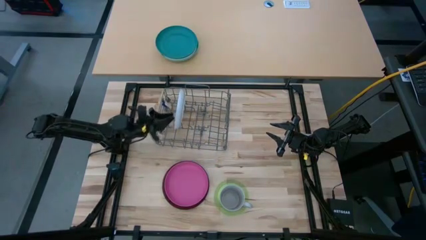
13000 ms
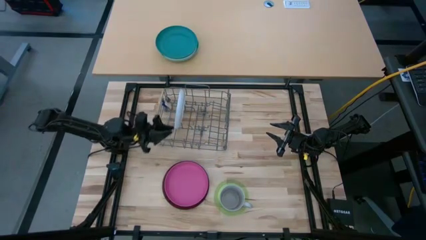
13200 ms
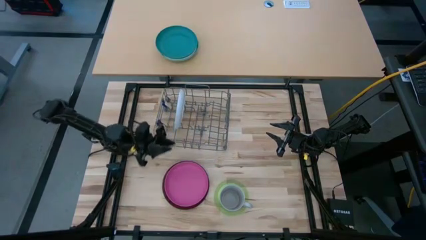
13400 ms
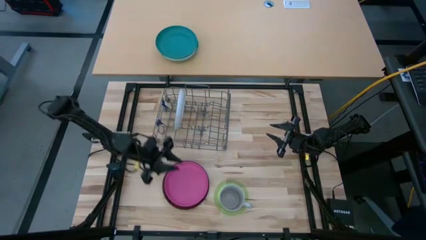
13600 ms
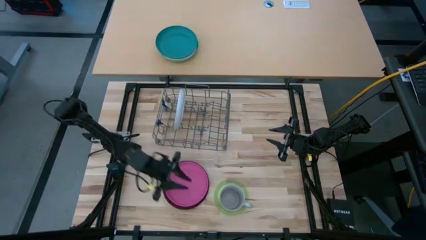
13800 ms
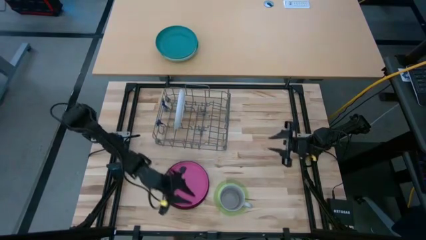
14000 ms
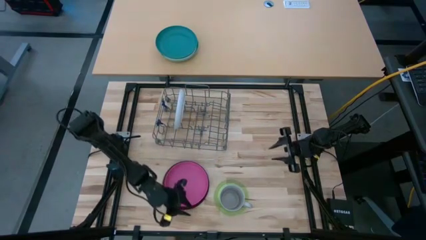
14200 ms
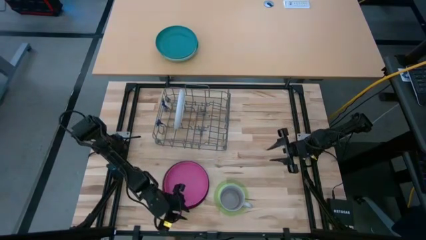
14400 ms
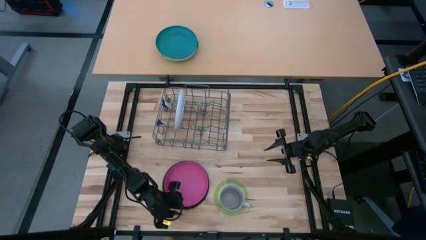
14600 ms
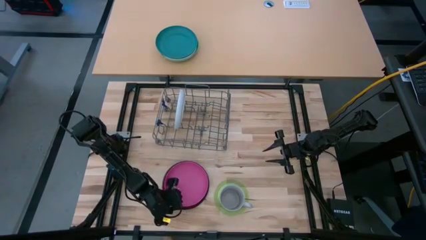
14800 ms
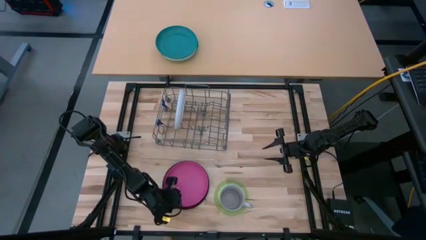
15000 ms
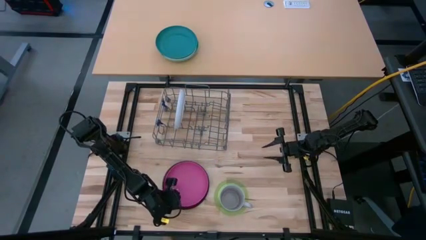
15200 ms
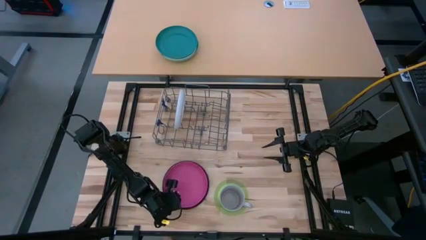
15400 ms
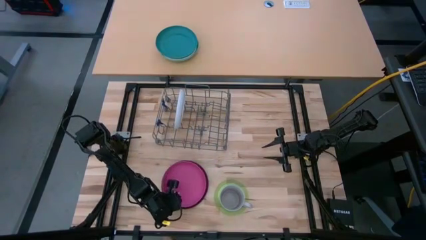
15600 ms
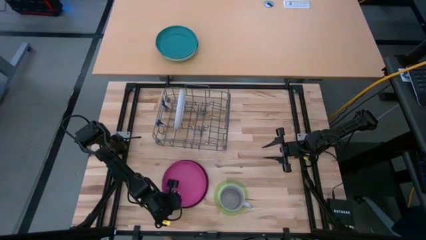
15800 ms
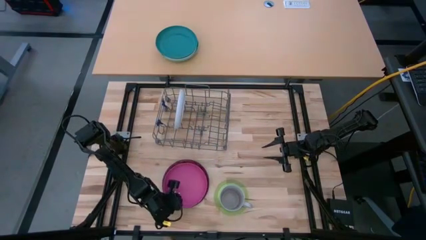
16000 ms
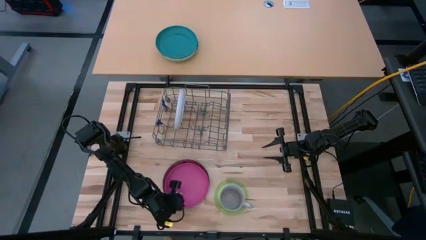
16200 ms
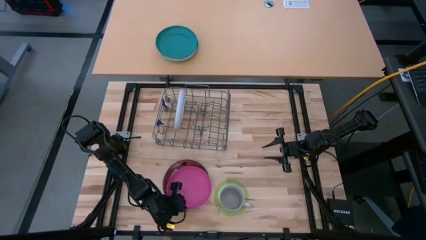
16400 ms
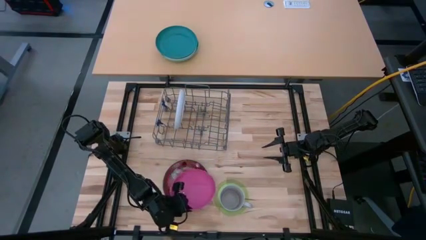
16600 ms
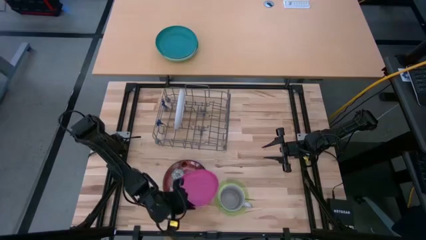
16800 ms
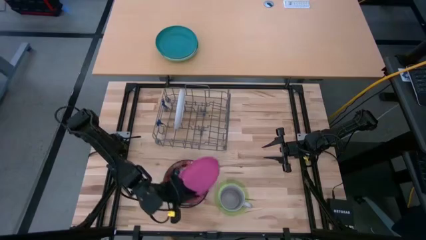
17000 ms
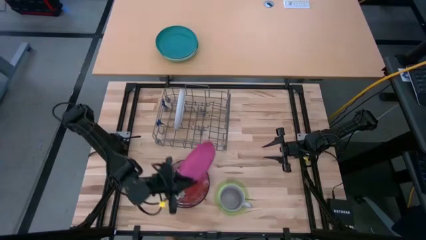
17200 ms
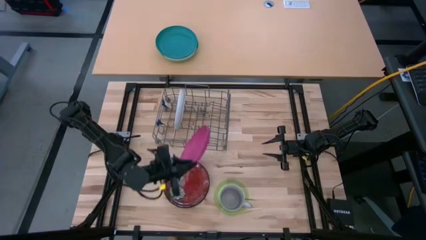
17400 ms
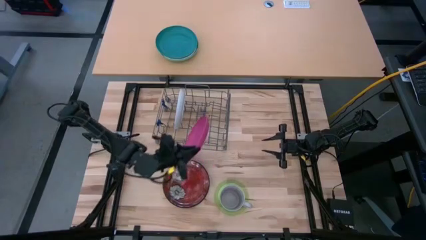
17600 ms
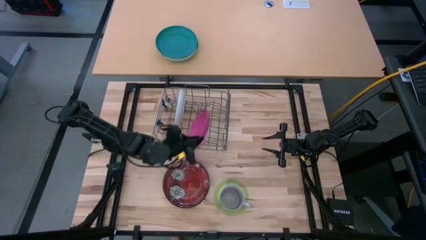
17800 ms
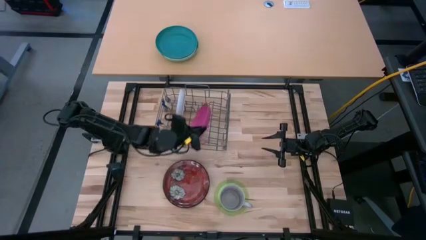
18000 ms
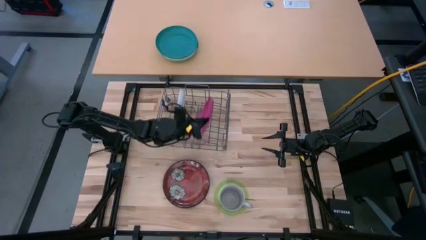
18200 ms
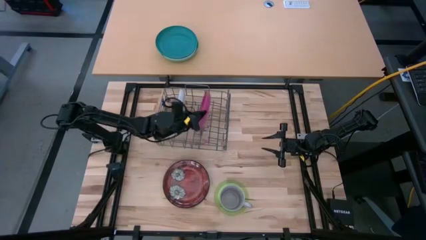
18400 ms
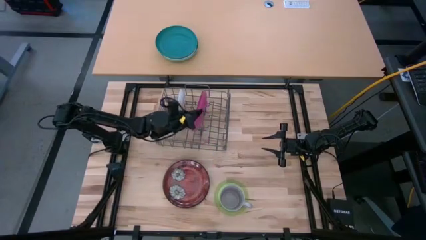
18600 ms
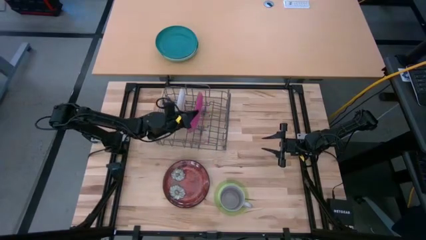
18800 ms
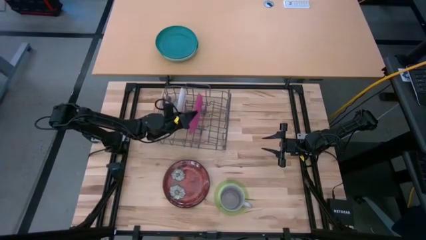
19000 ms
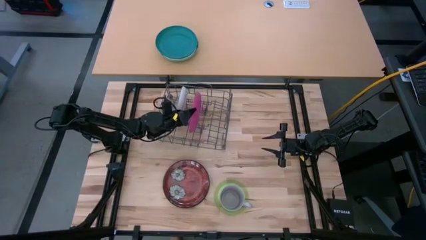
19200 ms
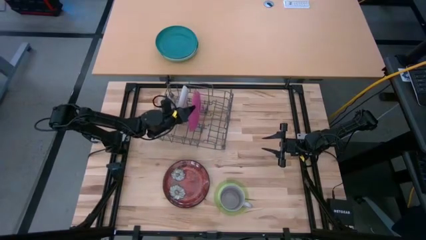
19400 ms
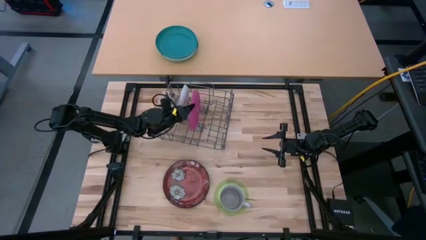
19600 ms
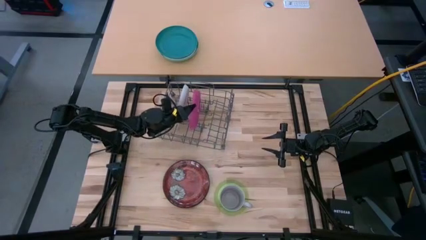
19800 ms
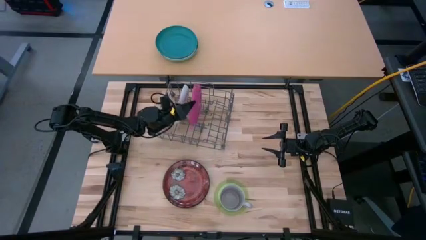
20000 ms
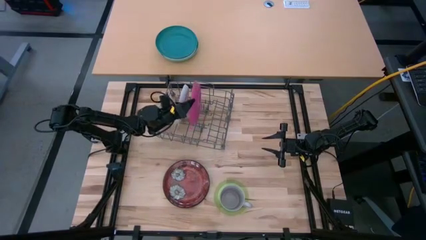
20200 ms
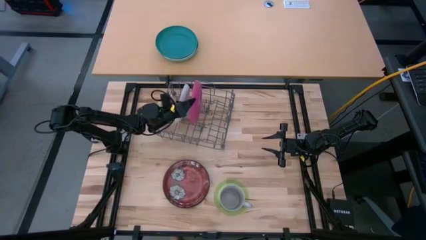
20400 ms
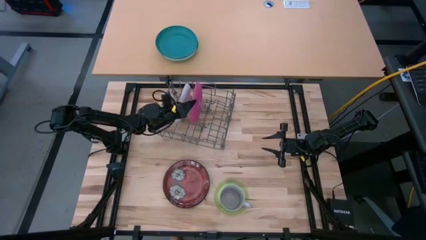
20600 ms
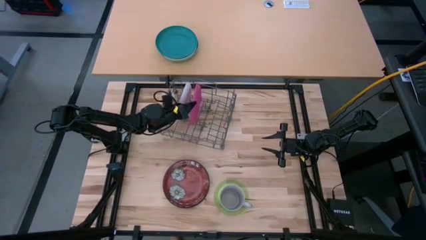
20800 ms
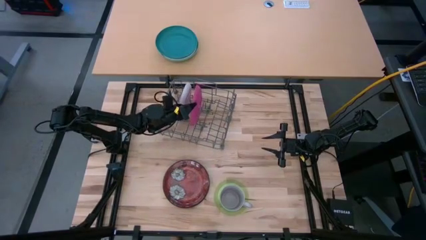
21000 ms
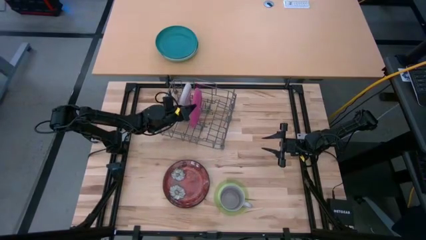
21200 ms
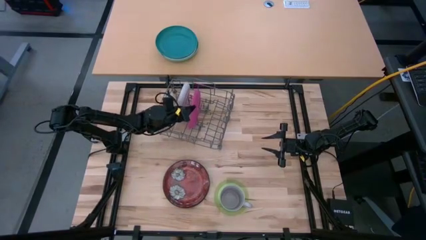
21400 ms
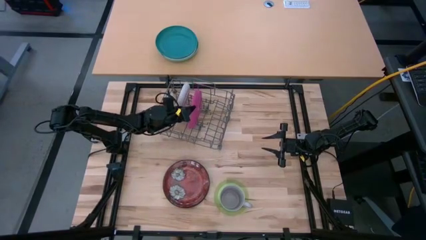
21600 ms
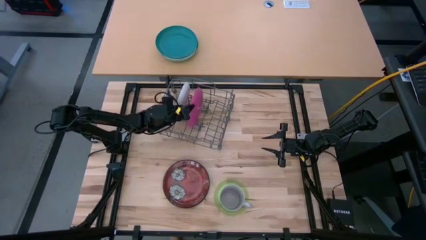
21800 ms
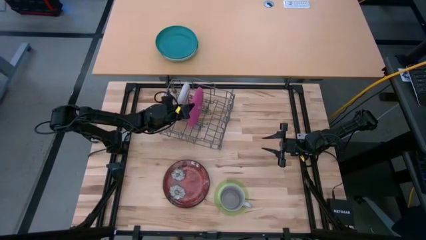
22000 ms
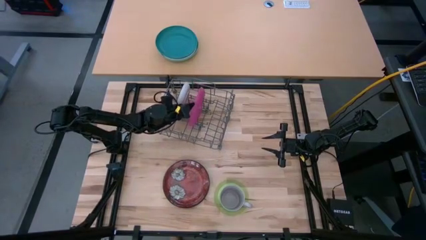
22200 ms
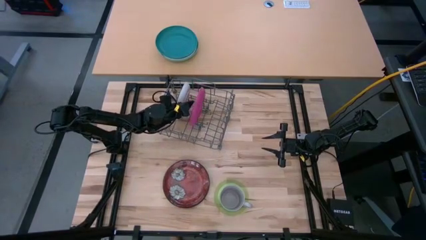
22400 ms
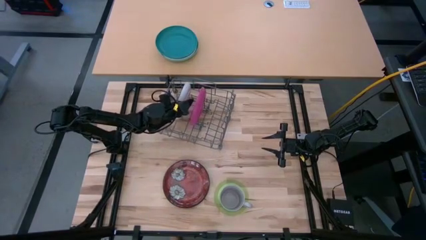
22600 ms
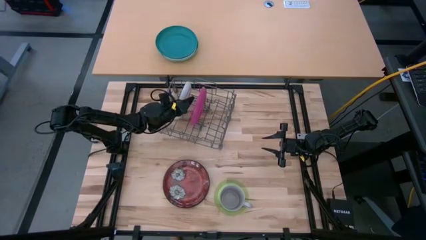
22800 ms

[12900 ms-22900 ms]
Task: Sort dishes
Put the pink plate in the dish rack
